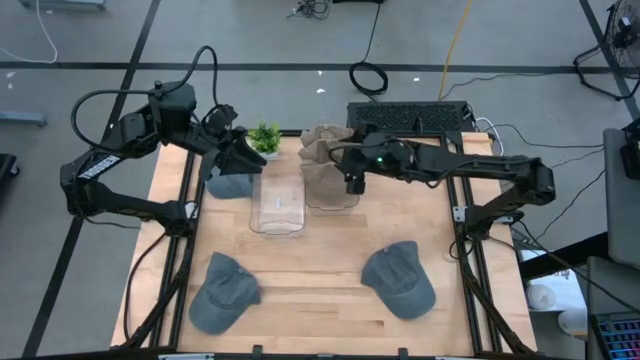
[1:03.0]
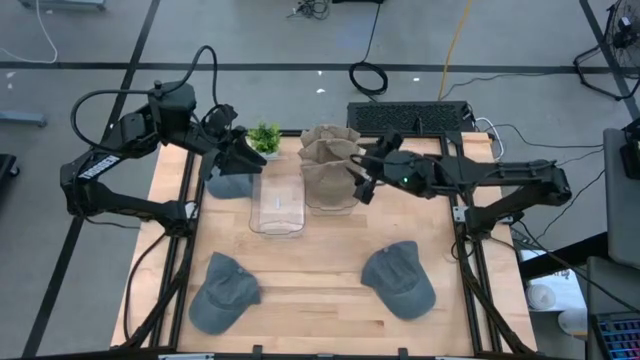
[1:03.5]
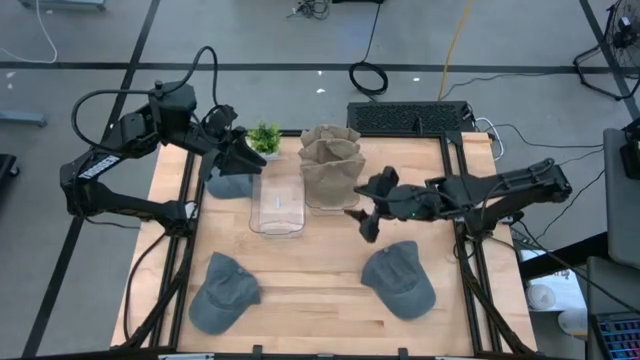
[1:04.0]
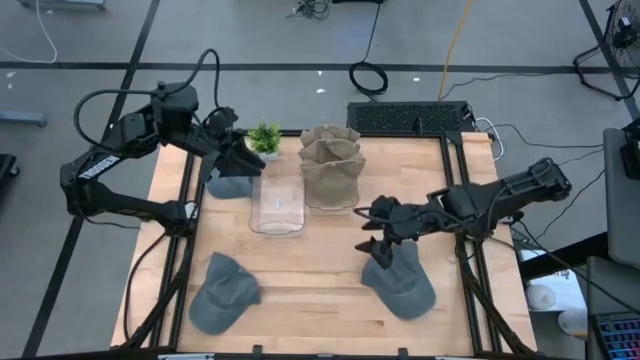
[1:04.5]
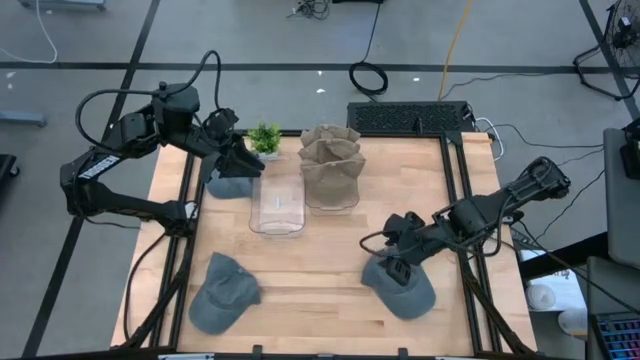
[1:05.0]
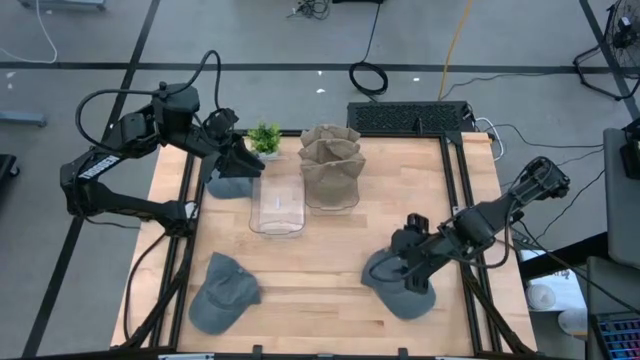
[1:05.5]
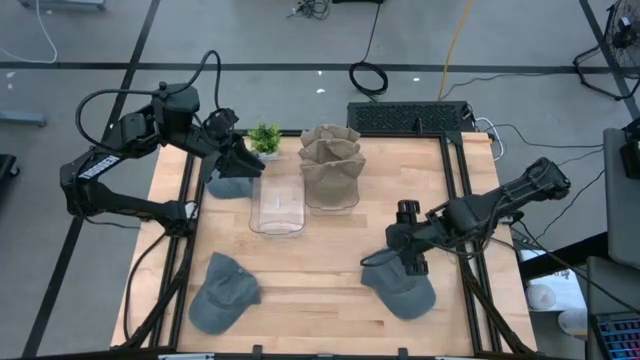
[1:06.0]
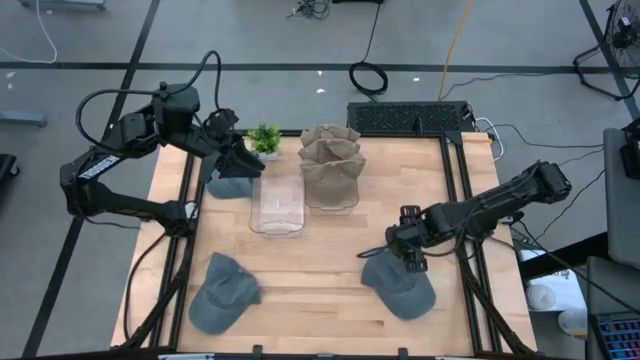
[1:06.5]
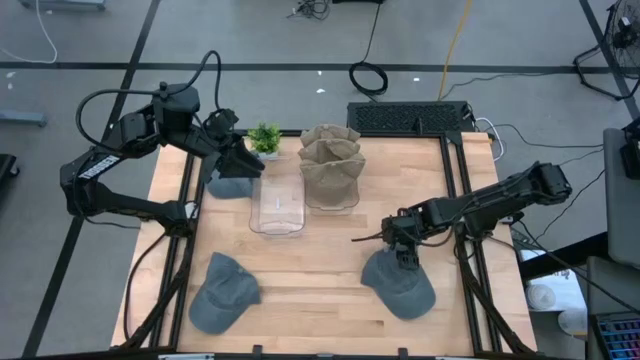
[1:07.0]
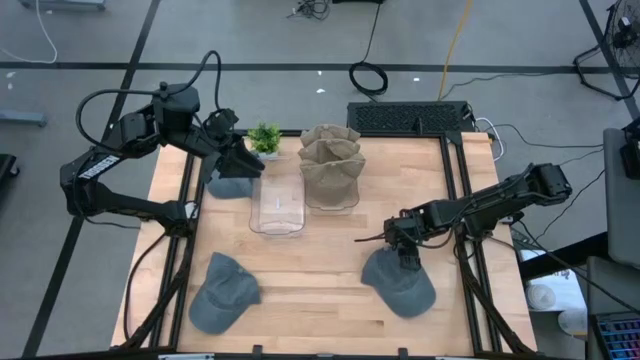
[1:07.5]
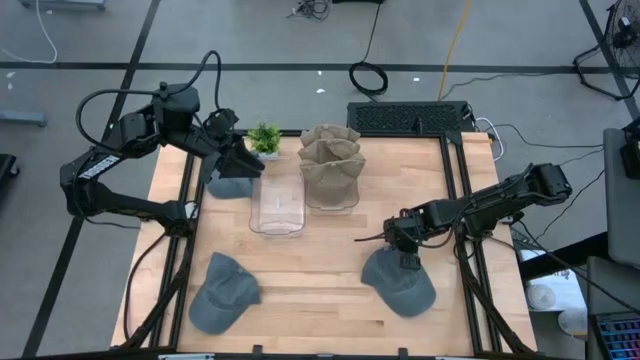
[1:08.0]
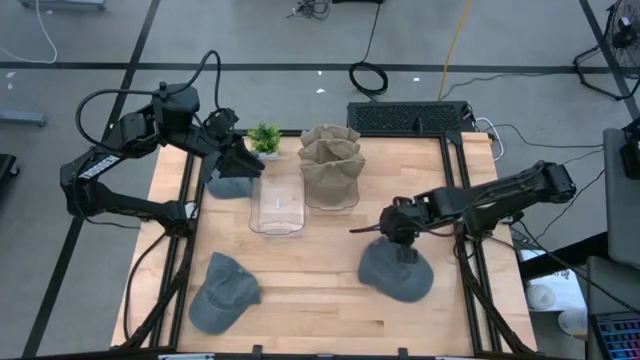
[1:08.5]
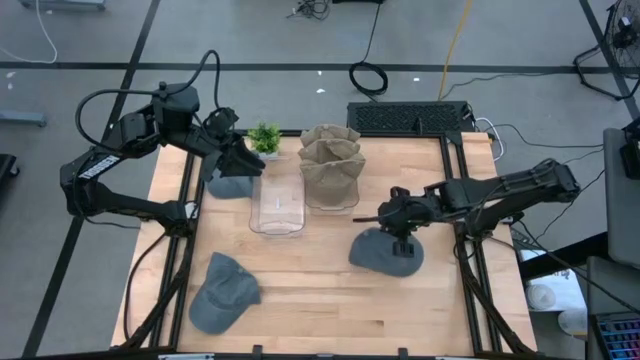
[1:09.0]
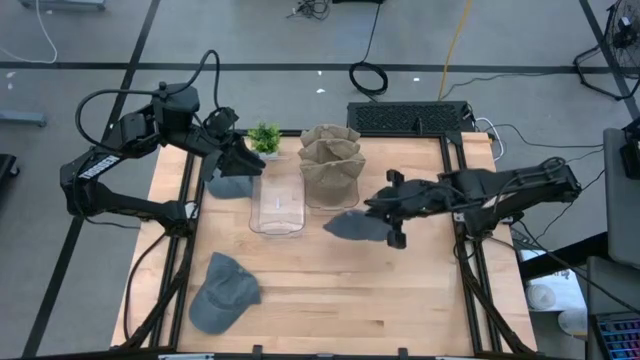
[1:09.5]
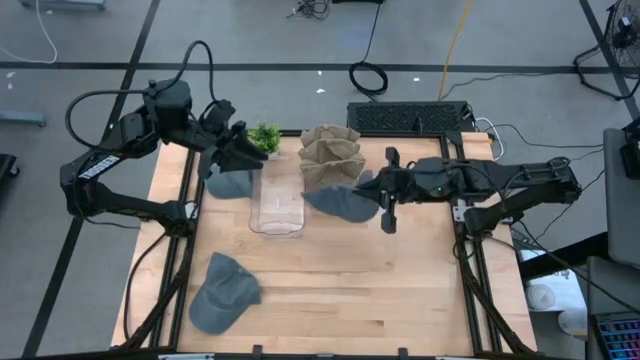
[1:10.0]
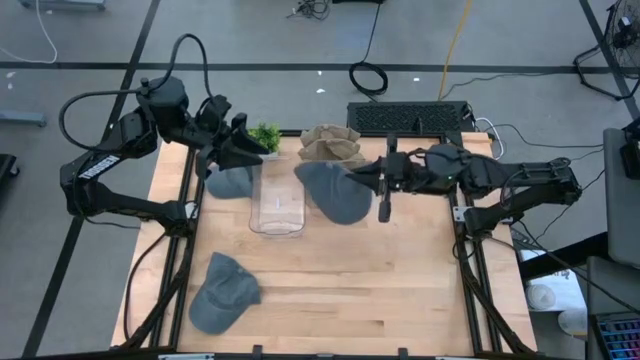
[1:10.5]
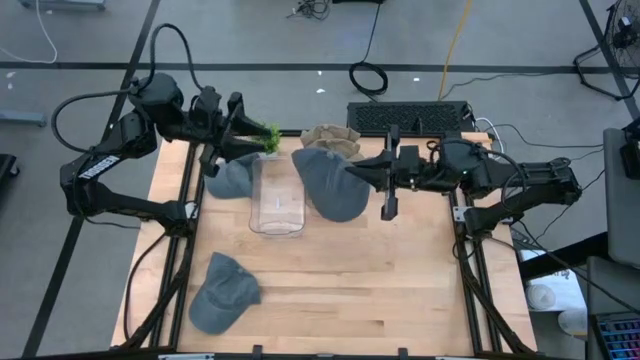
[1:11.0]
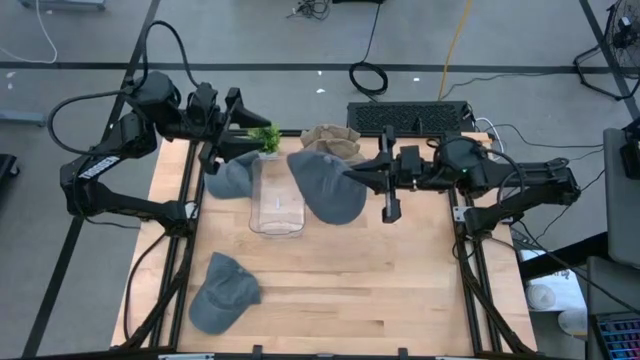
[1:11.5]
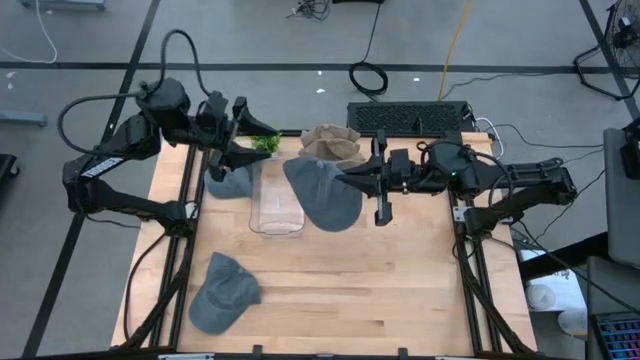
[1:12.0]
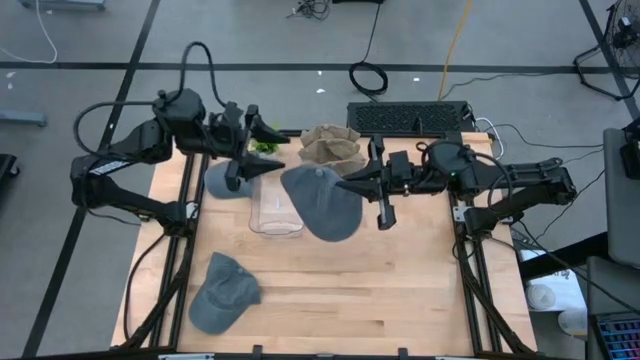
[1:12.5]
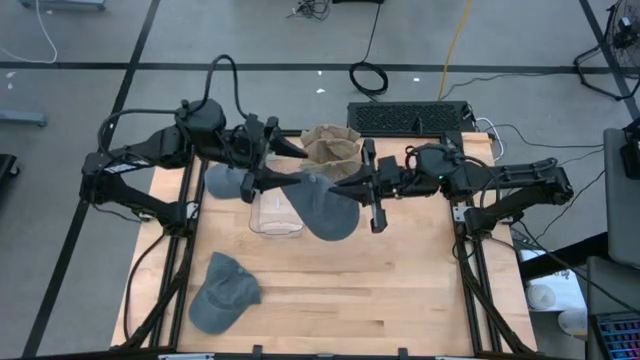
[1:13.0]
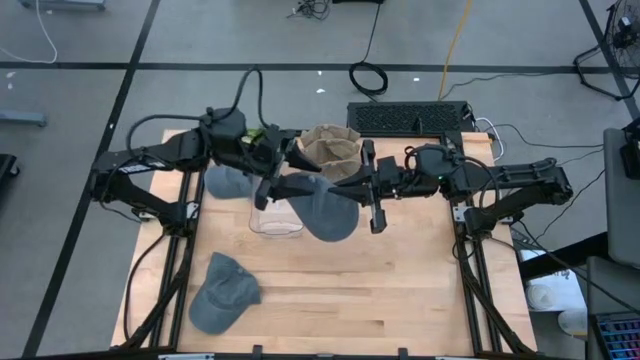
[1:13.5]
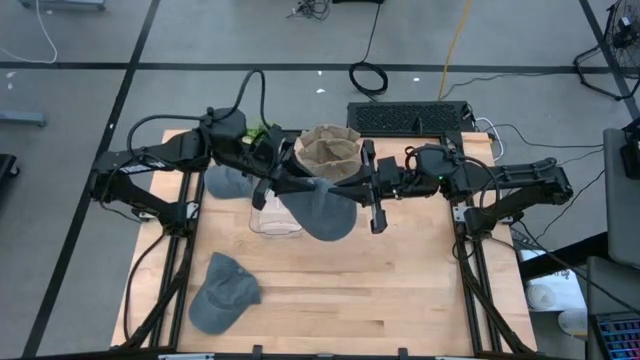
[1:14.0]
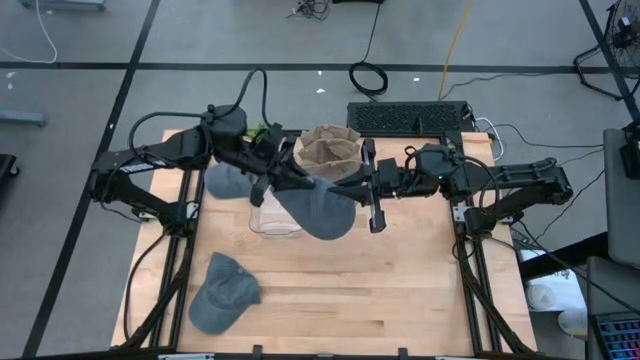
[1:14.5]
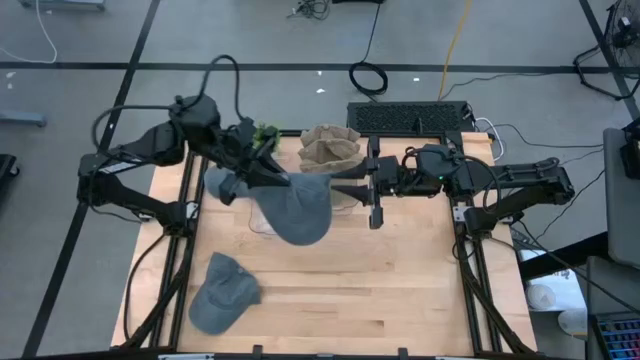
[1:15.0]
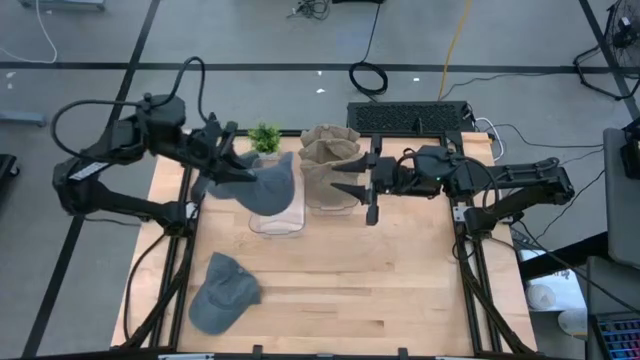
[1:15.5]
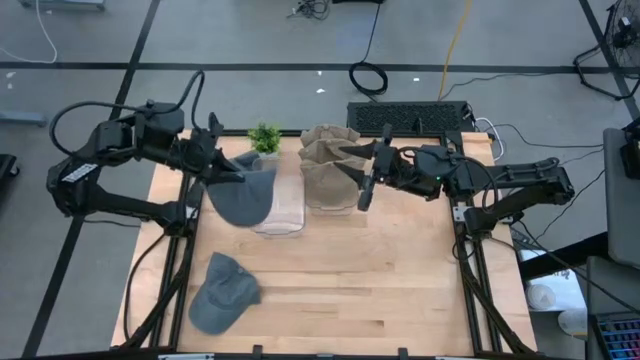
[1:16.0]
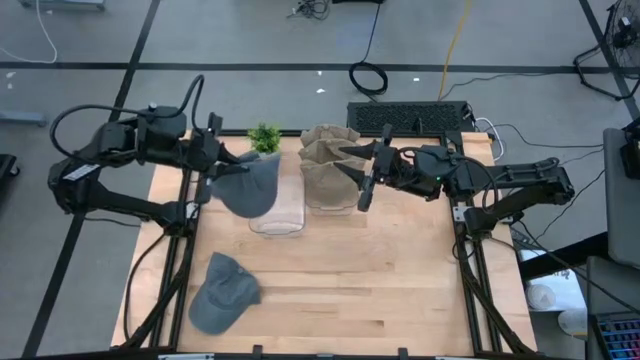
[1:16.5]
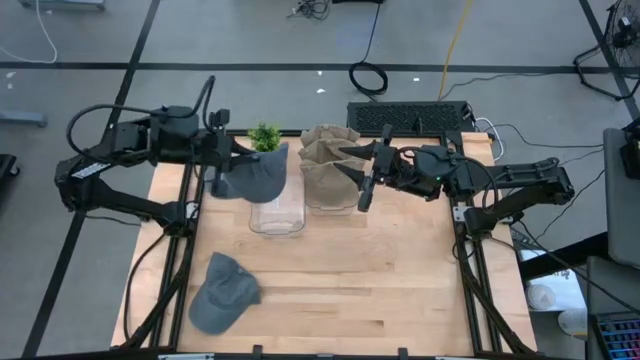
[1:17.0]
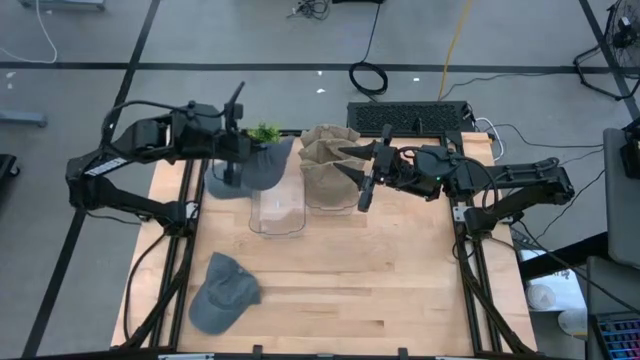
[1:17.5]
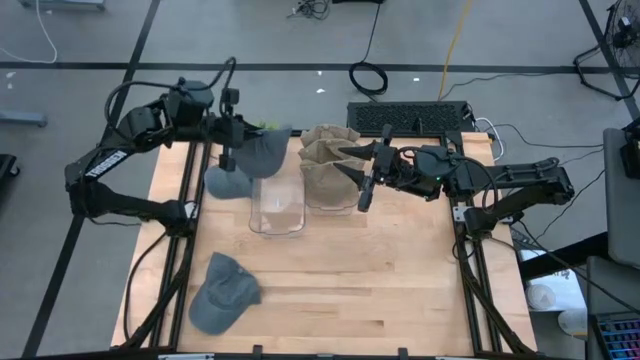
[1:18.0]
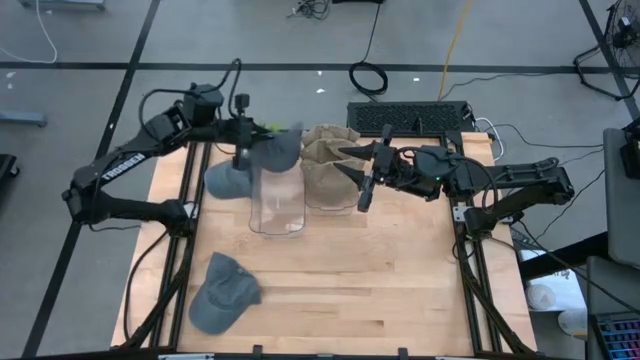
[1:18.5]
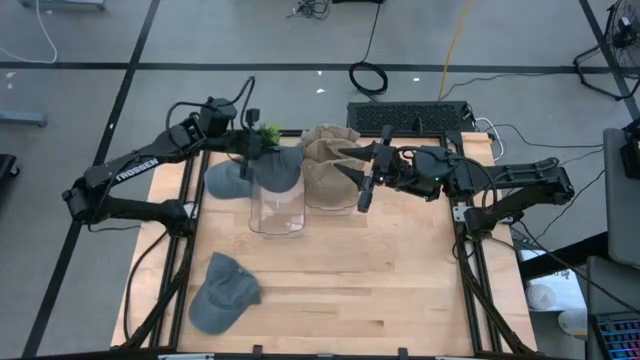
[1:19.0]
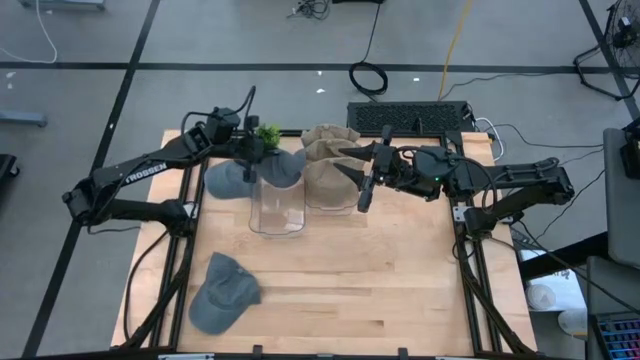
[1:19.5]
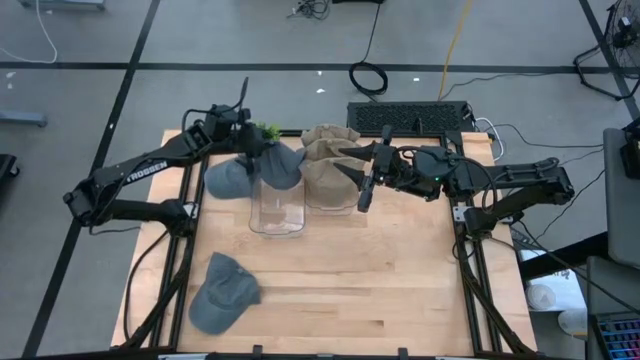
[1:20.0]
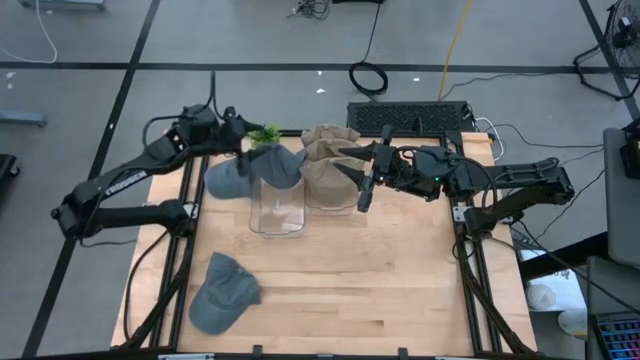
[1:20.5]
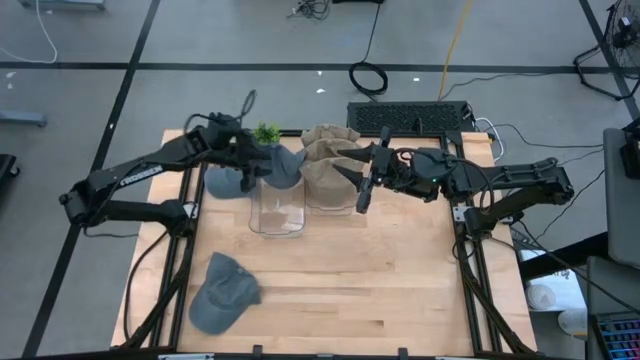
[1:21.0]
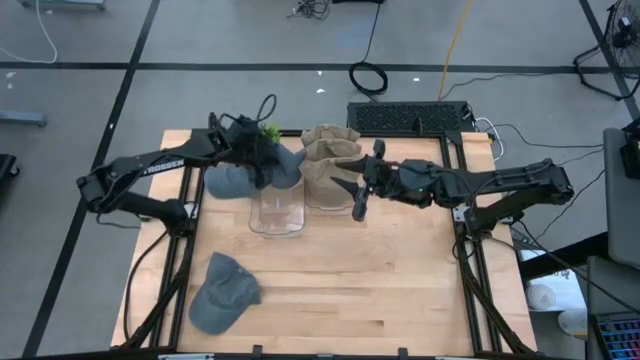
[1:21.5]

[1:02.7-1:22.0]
Task: Pick & Place hat
Put the right blue cap into the left transparent bin

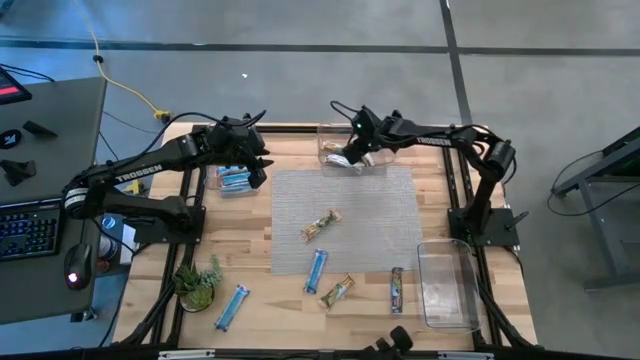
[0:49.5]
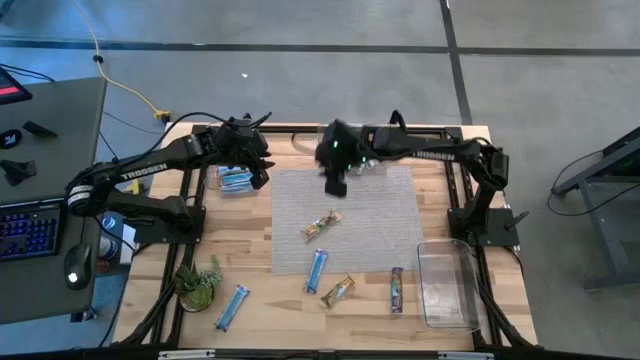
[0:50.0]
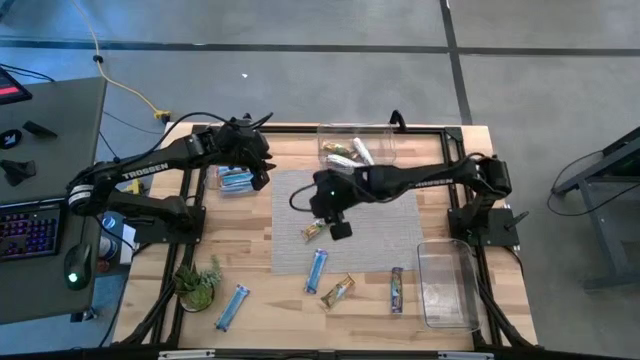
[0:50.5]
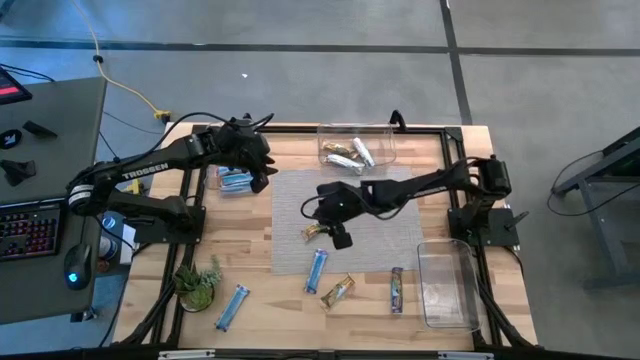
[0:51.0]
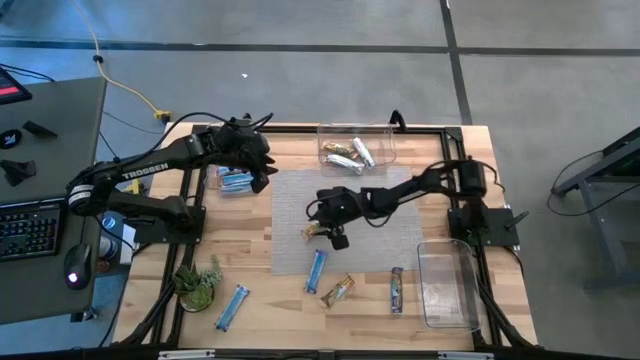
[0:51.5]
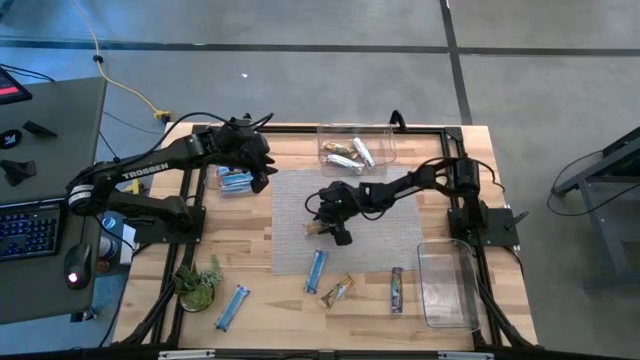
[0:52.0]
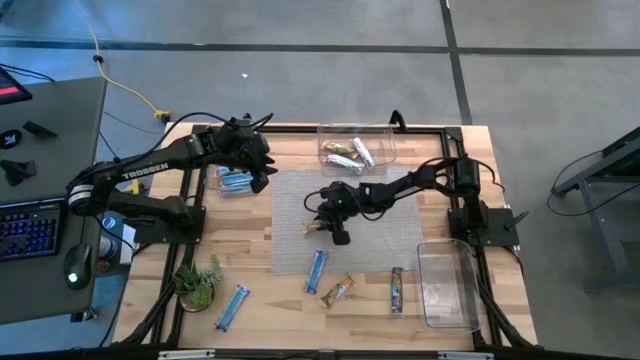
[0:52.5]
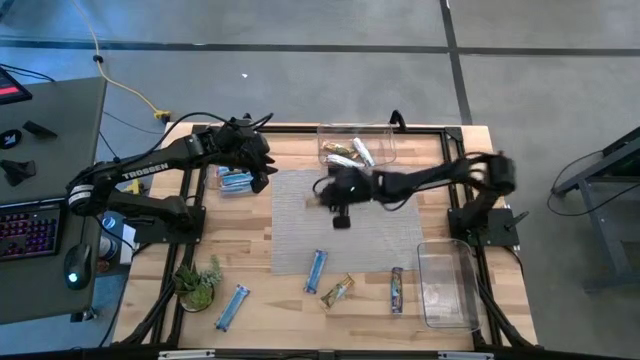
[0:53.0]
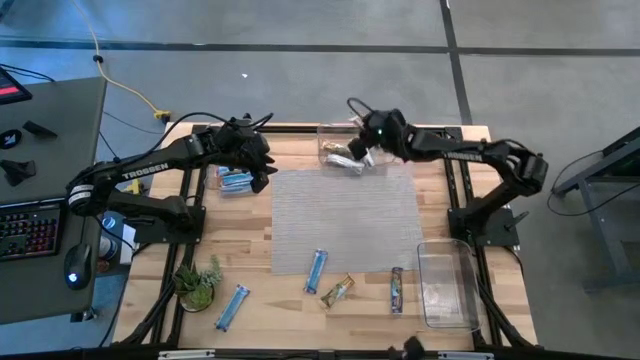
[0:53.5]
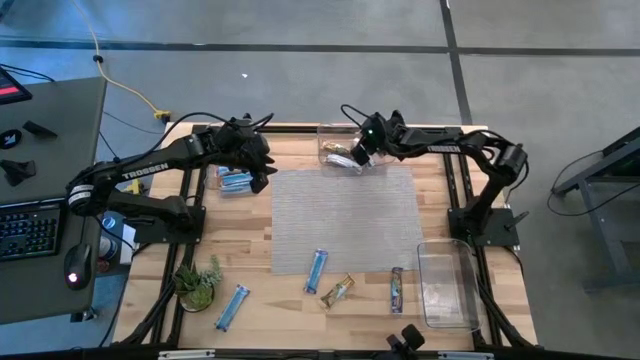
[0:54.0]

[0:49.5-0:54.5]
Task: Pick and place Granola Bars by type
Put the yellow granola bar into the top right transparent bin
